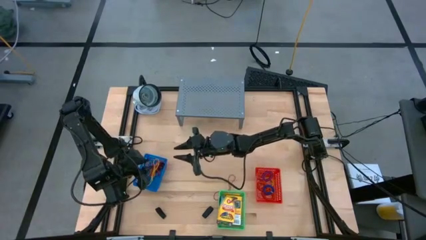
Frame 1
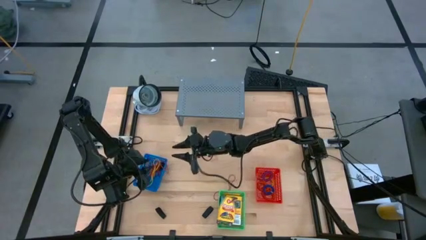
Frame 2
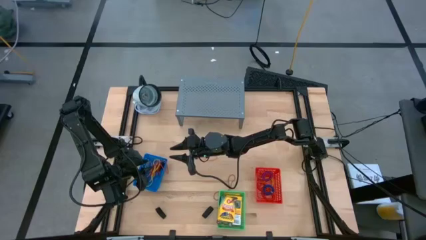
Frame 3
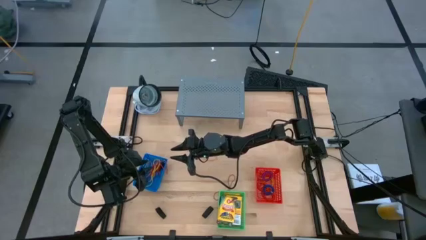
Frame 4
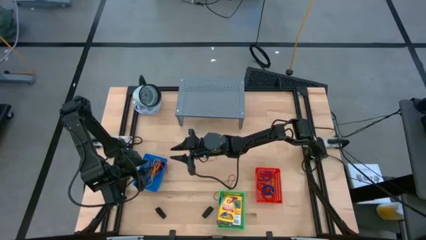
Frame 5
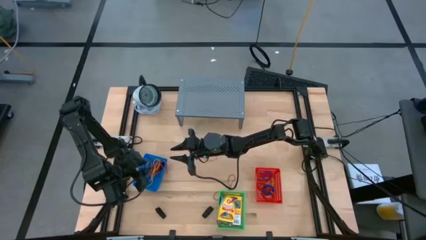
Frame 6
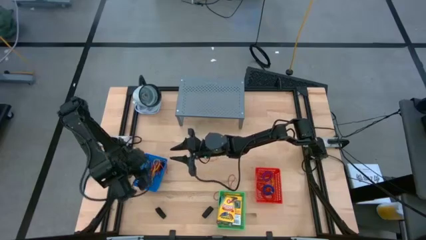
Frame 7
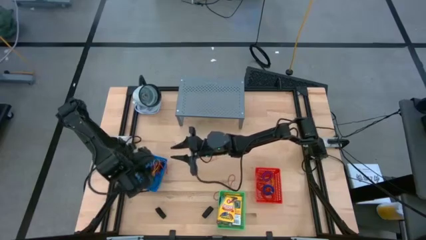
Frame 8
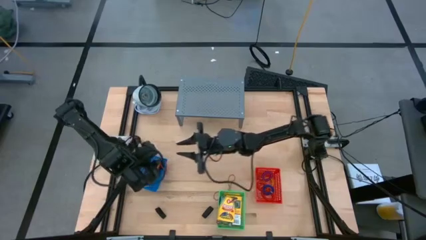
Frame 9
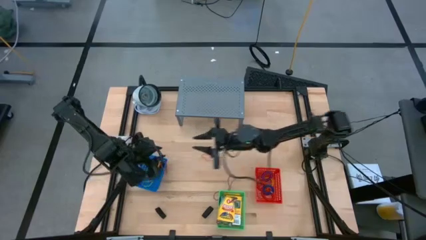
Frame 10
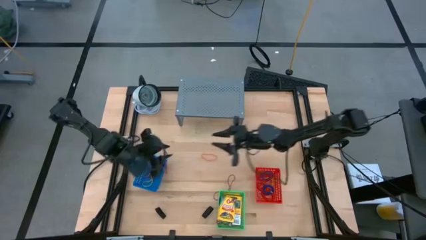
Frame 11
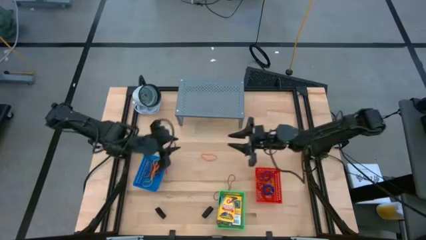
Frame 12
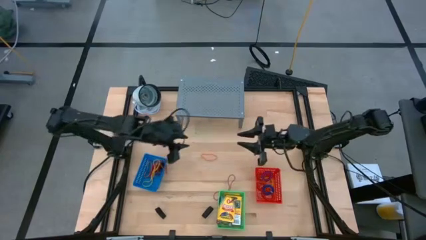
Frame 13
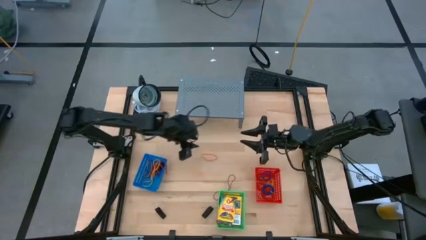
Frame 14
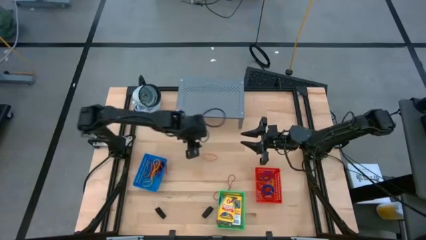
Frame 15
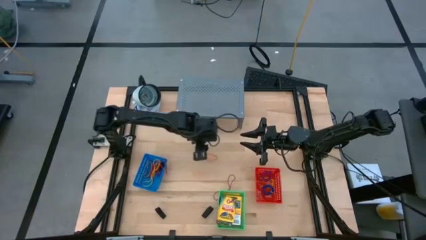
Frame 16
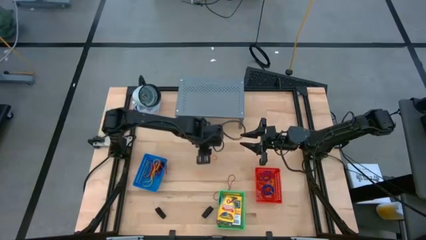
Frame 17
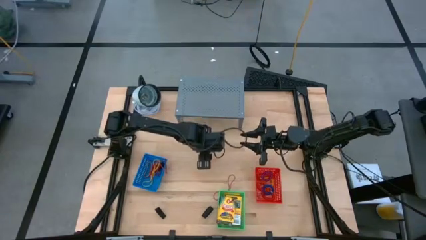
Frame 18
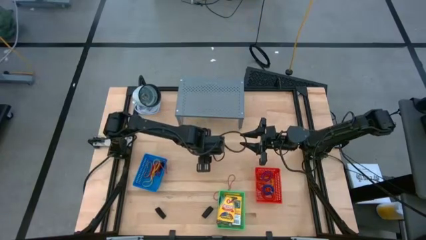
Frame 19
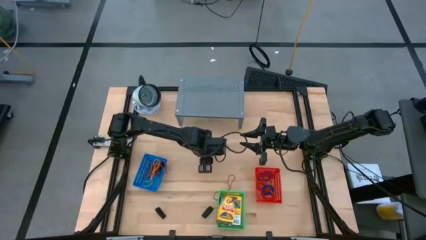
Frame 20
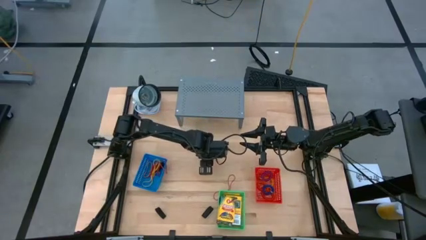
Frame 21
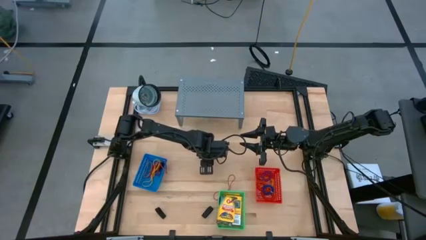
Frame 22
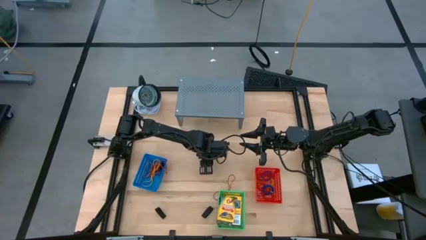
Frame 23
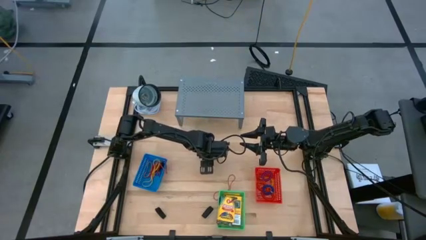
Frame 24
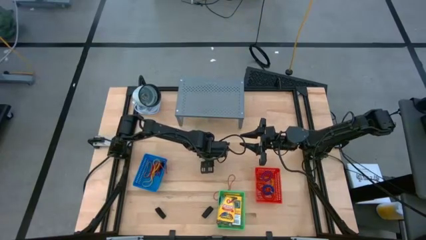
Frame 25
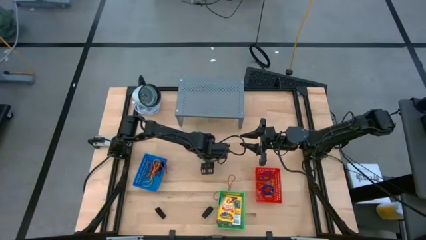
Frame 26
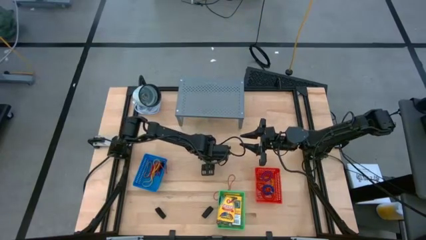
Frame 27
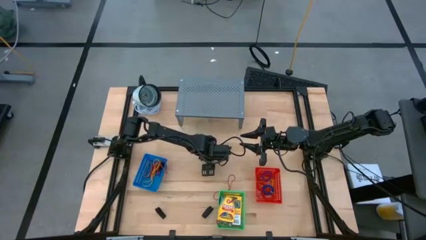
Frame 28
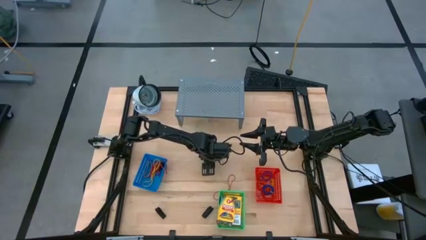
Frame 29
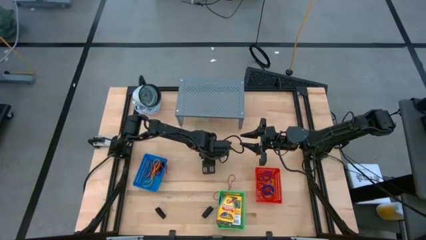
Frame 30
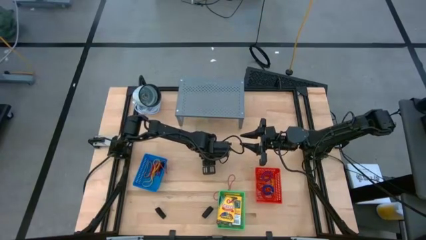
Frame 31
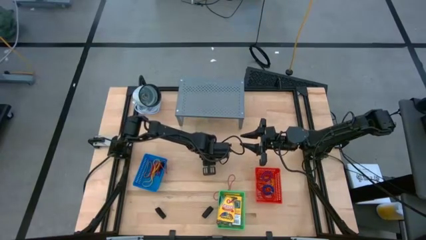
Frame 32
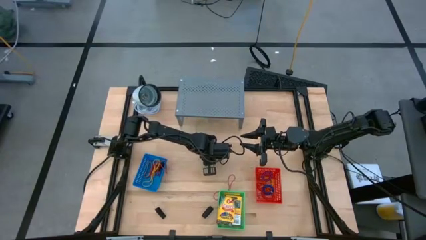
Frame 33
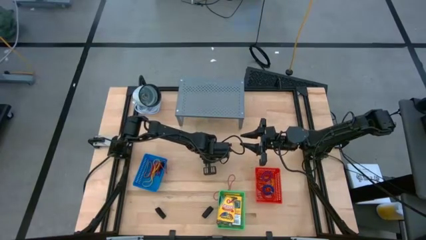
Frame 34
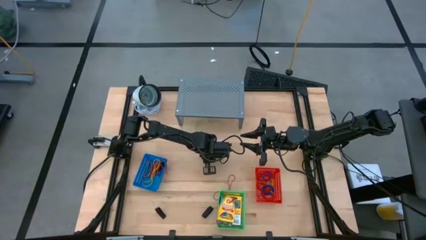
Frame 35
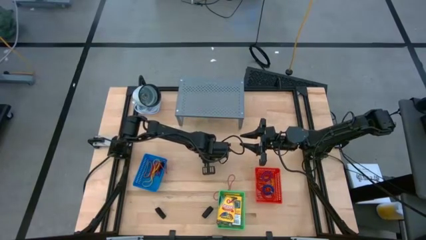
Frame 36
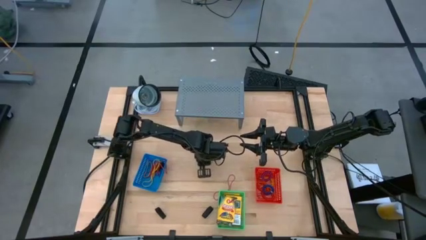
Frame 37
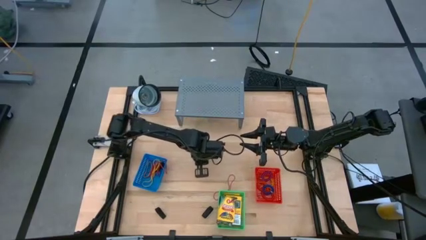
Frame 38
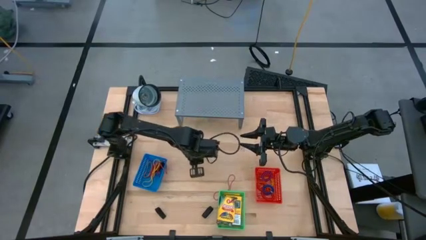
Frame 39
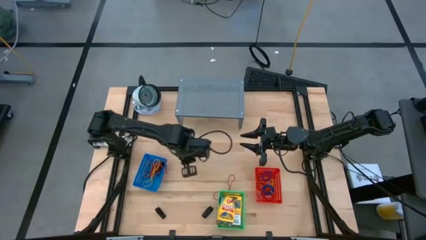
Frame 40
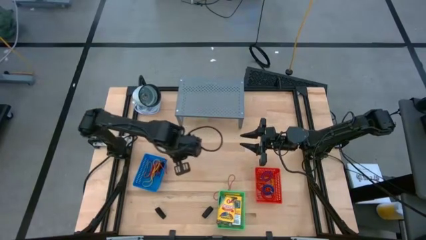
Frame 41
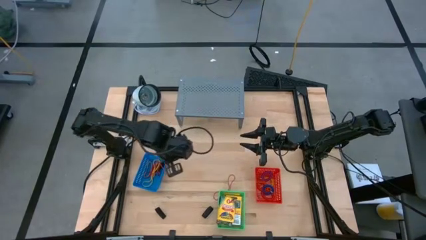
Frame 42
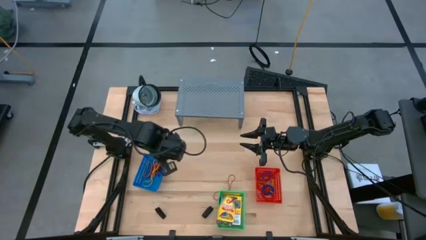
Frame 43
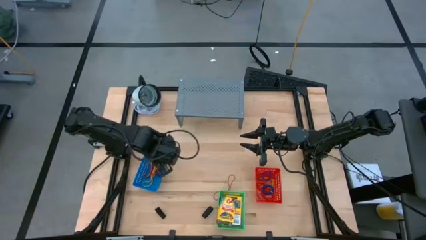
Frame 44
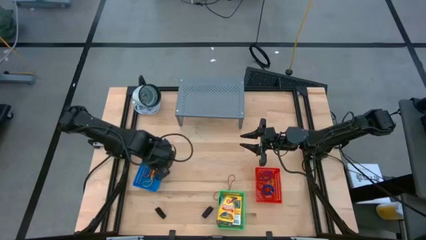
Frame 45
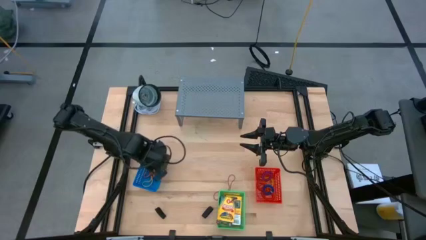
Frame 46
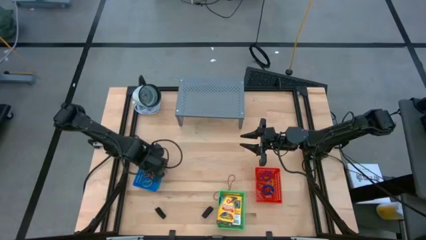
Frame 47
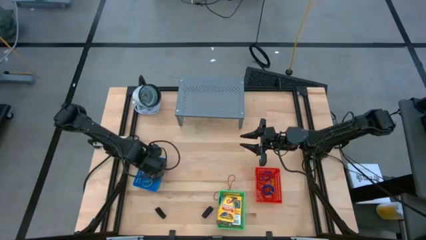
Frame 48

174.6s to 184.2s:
Task: Pick & Place Office Desk Supplies
Put the orange rubber band into the blue bin
